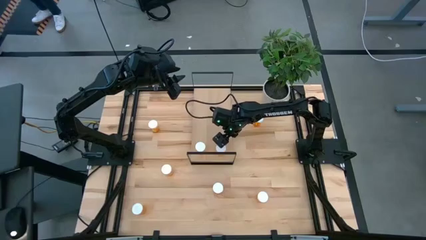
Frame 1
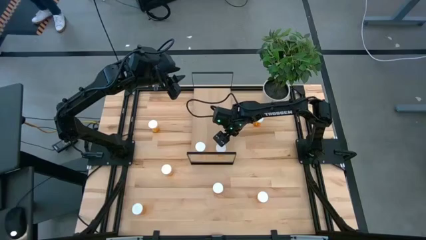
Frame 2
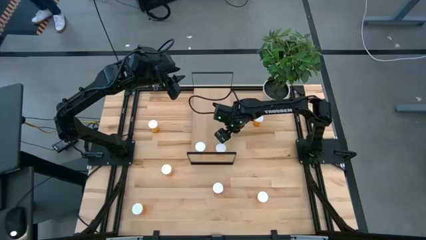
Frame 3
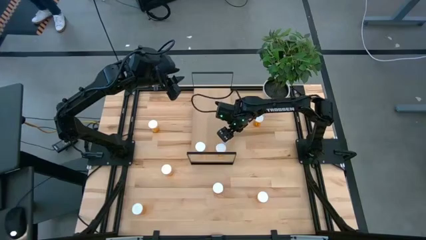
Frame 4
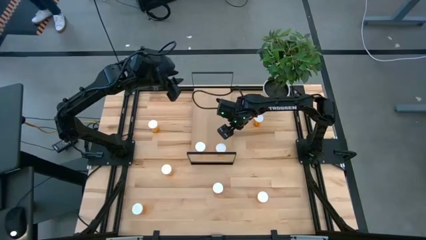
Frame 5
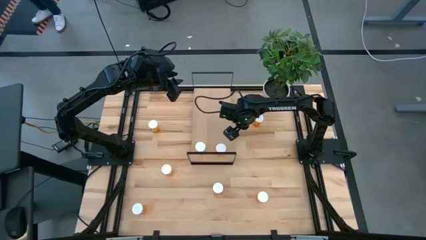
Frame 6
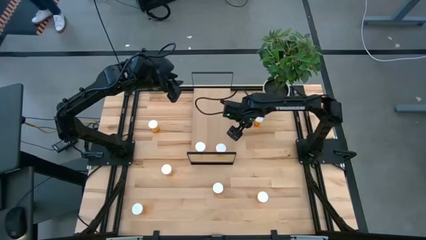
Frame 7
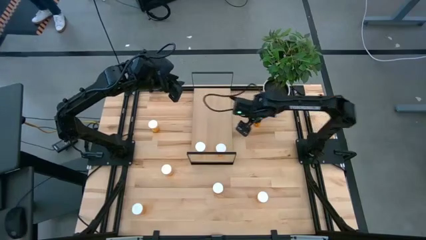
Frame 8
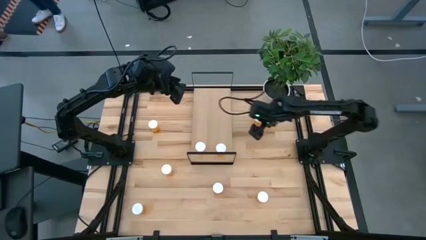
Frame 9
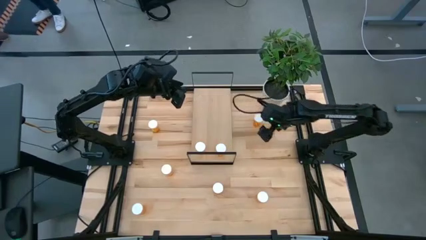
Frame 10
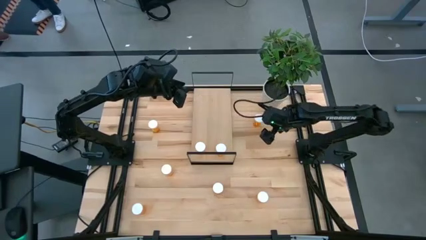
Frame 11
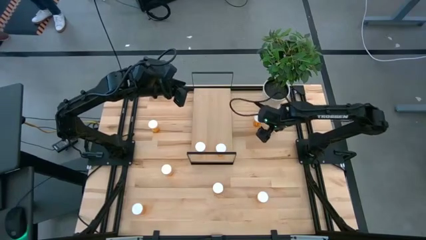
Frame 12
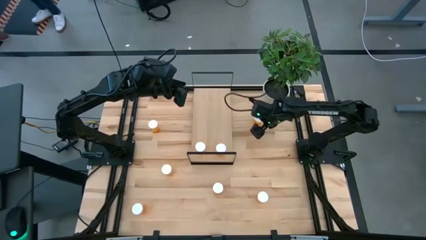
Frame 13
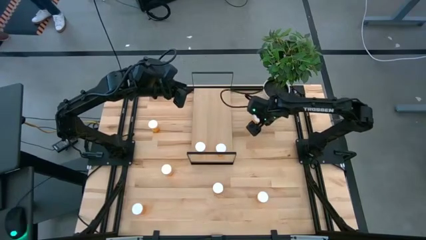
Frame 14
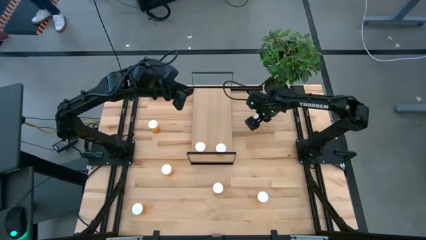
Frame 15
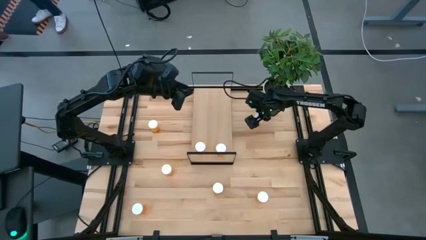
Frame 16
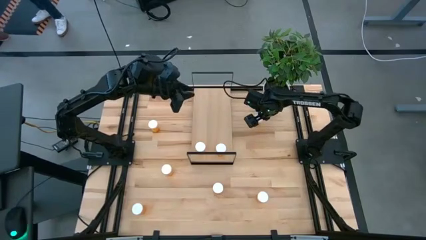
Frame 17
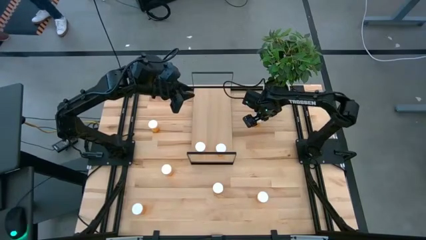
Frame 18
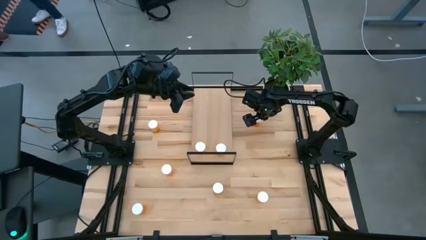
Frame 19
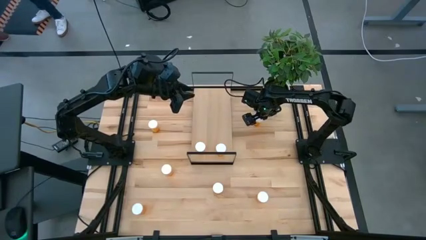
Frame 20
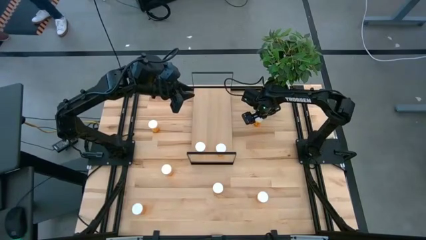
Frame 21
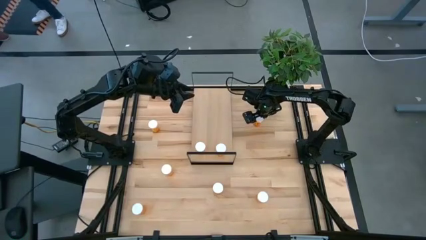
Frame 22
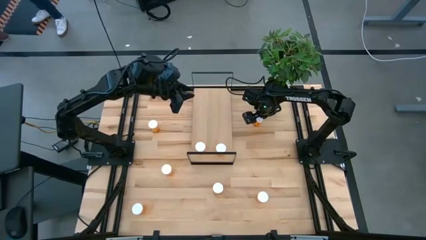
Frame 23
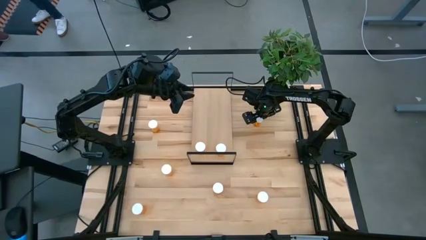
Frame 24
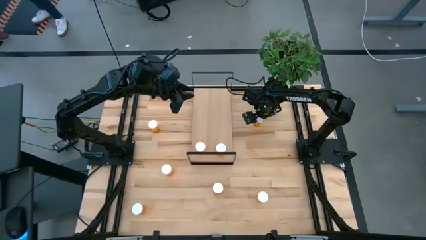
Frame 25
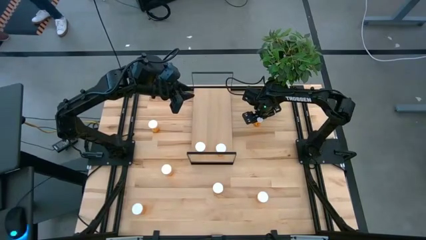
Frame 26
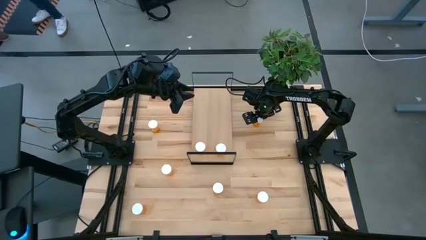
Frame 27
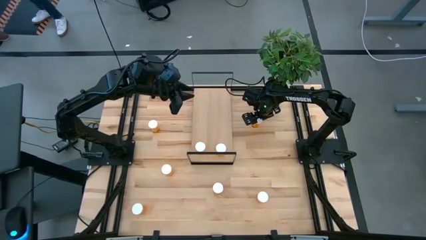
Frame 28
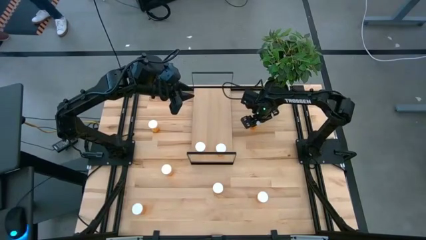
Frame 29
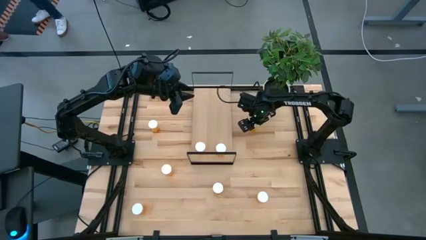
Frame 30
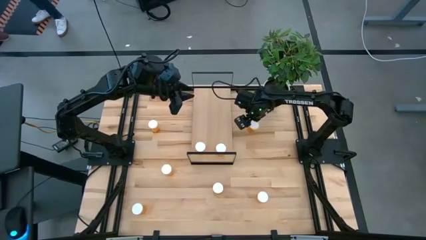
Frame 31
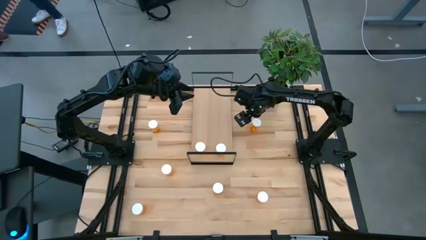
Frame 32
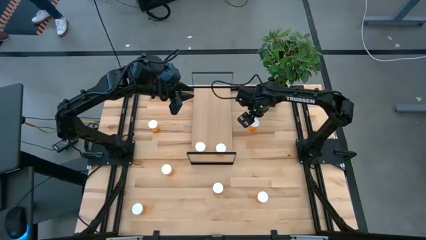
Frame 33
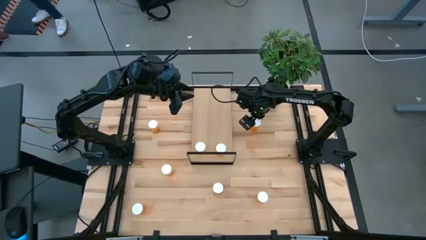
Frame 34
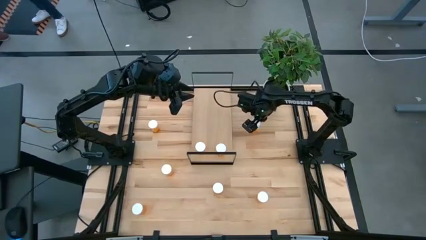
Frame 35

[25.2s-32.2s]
Task: Pick and place medicine bottles onto shelf by color
Put the orange pill bottle on the shelf aligned with the other orange pill bottles

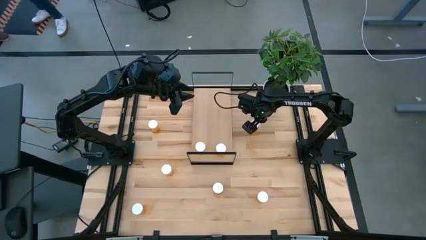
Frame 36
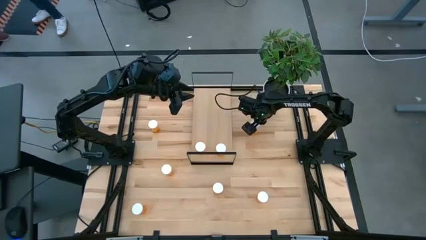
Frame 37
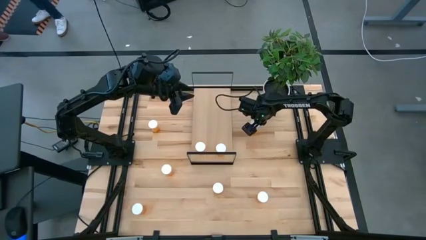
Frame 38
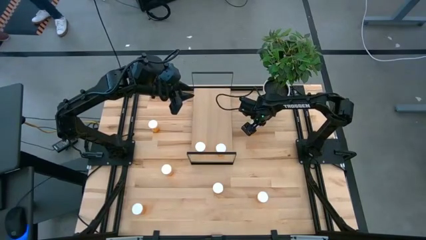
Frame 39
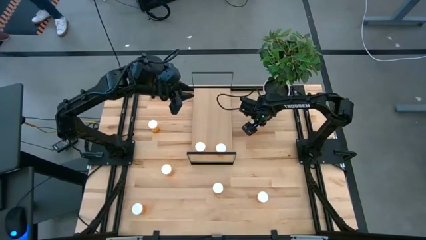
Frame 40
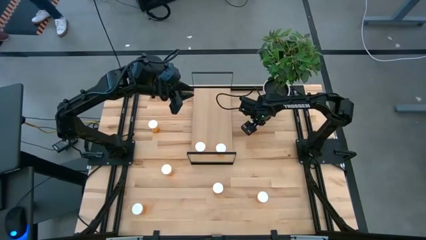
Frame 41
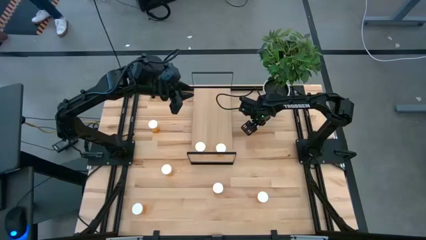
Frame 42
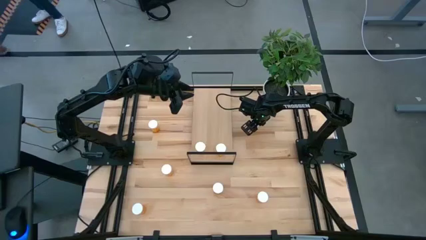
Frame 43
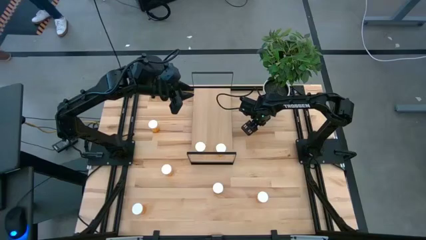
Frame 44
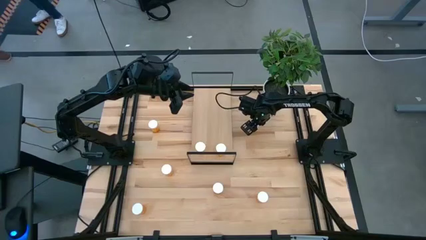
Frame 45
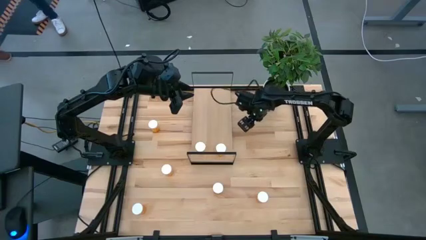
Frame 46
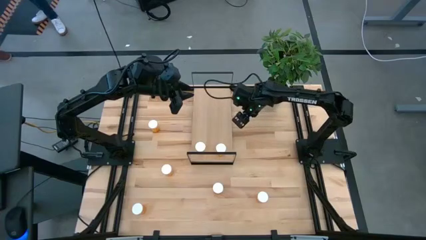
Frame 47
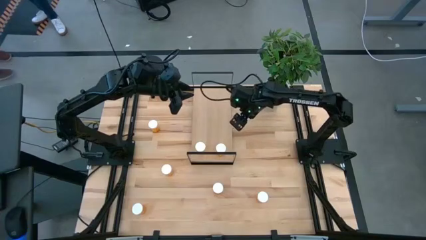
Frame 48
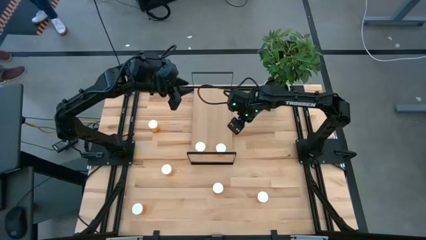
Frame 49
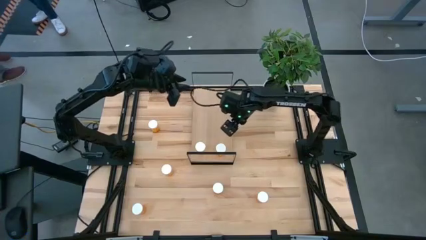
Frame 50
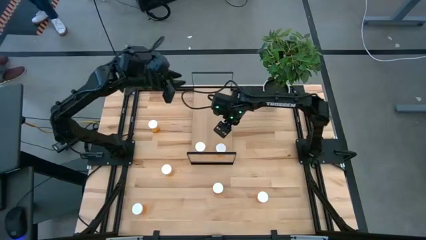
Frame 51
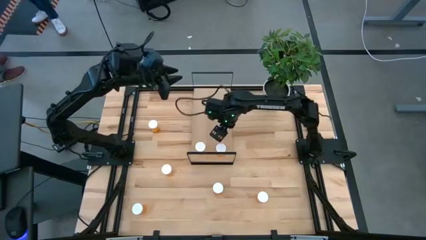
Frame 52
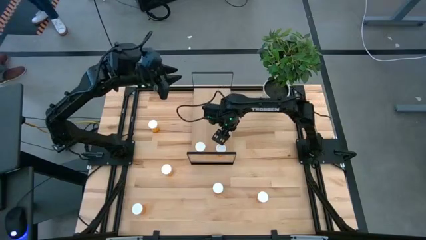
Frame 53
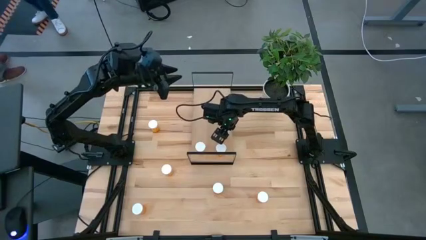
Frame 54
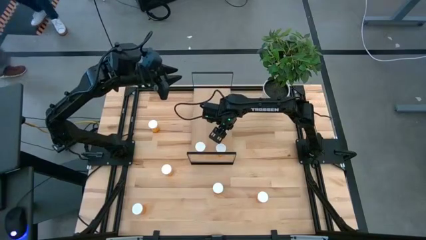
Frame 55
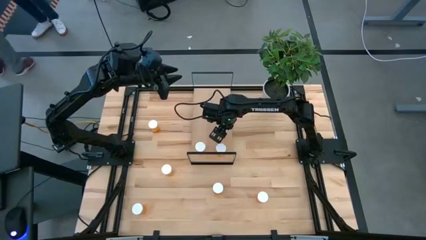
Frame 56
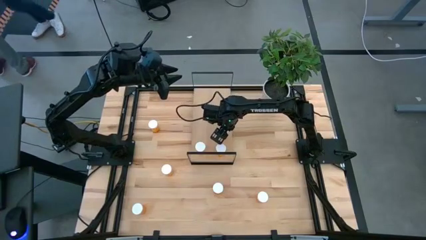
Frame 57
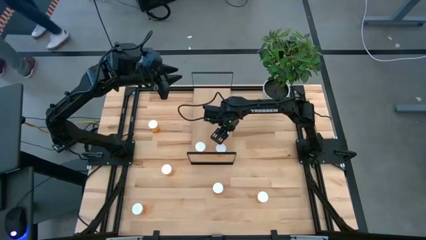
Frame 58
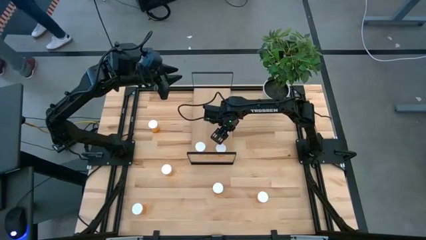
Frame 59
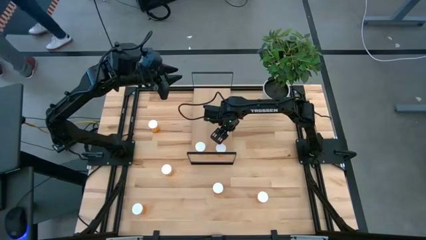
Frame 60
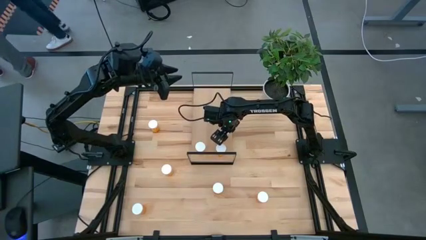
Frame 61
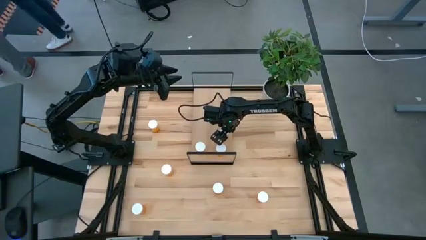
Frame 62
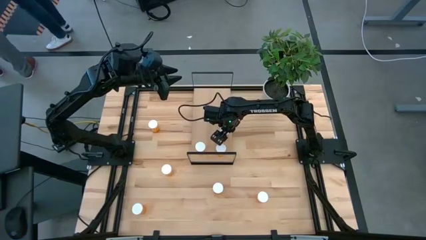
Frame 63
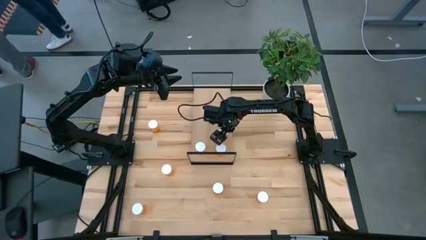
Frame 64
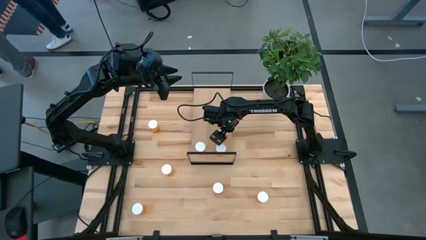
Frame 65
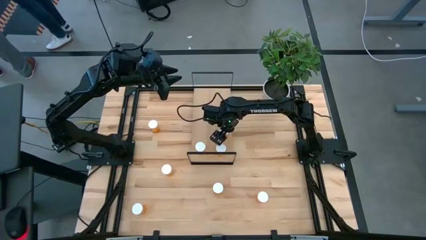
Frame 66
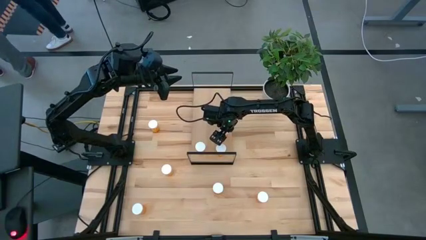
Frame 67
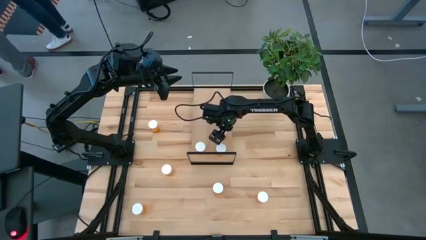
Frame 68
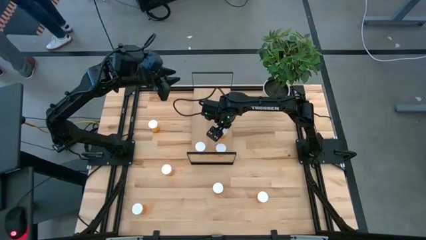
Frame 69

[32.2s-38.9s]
Put the orange pill bottle on the shelf aligned with the other orange pill bottles

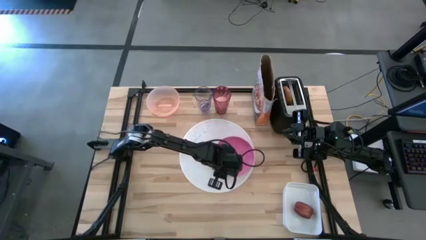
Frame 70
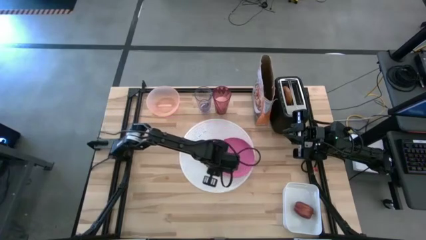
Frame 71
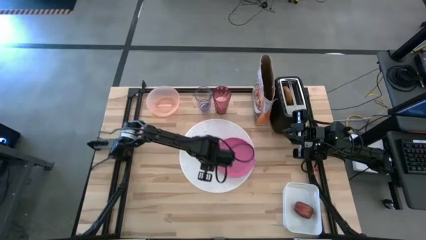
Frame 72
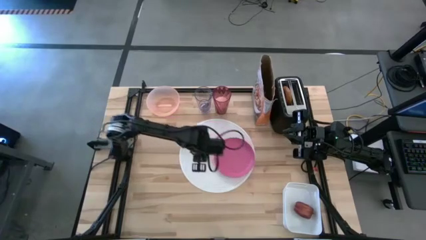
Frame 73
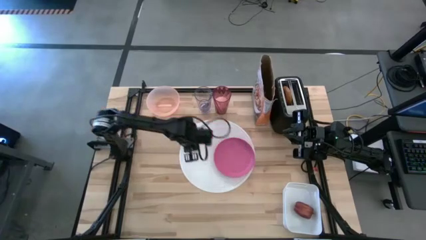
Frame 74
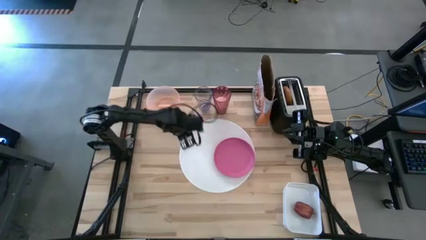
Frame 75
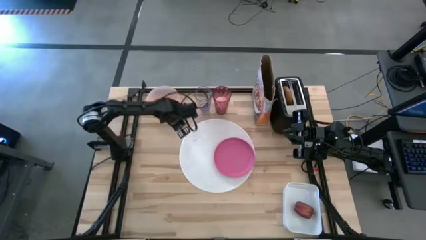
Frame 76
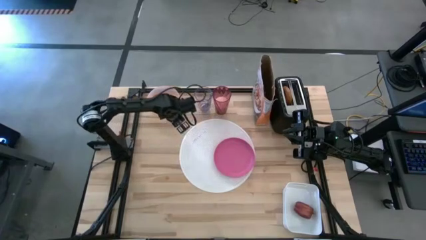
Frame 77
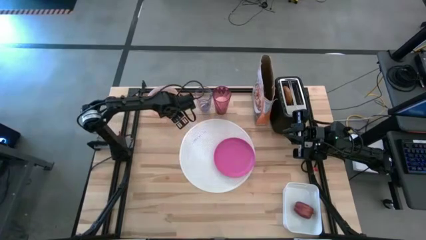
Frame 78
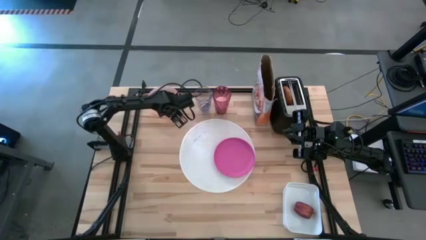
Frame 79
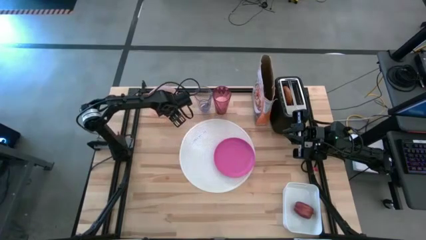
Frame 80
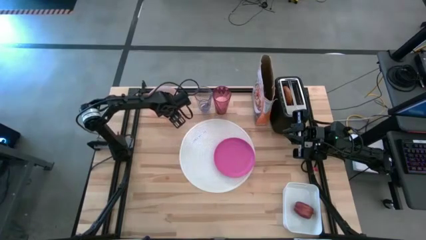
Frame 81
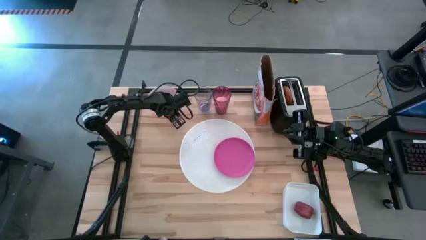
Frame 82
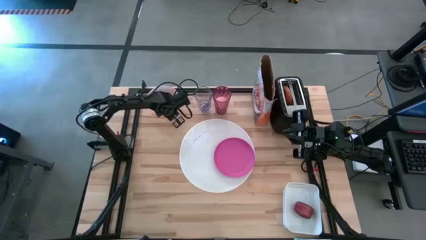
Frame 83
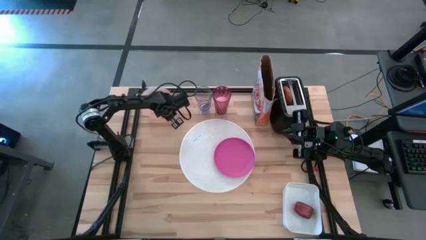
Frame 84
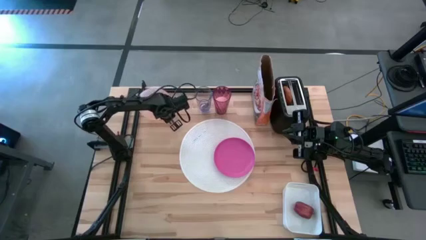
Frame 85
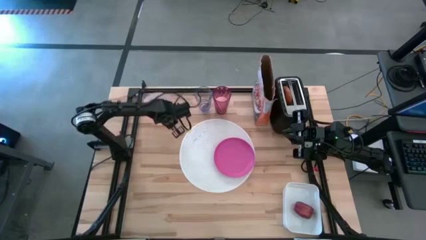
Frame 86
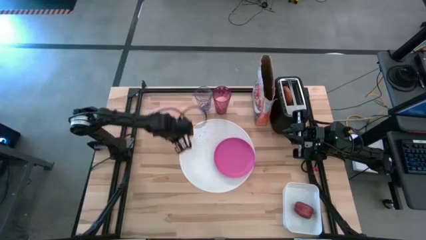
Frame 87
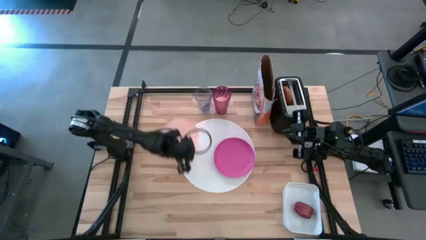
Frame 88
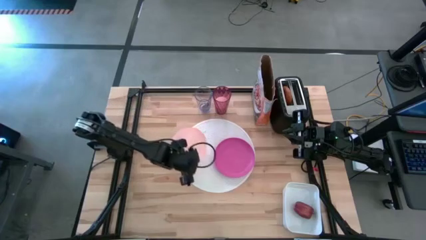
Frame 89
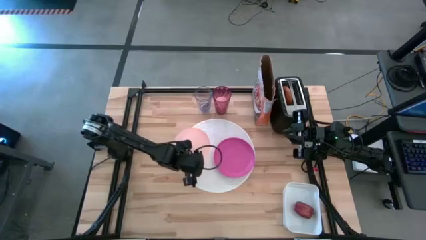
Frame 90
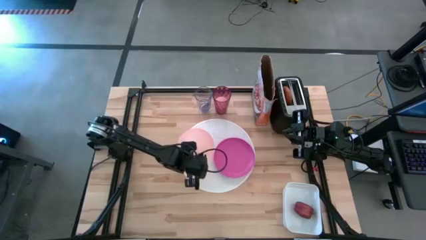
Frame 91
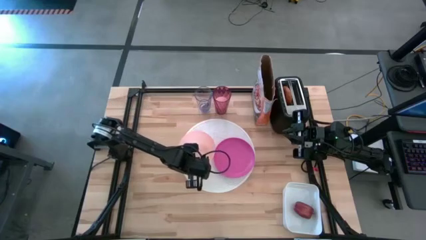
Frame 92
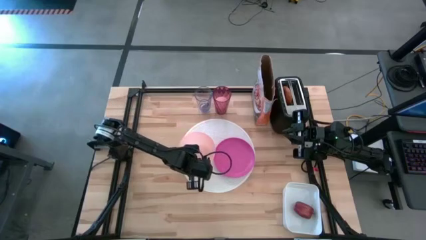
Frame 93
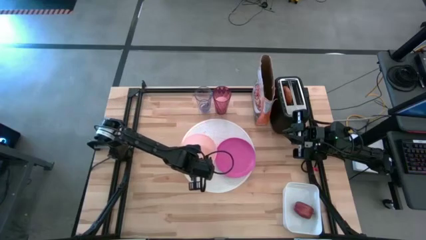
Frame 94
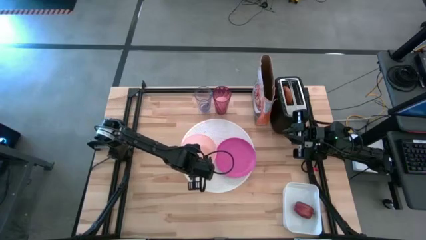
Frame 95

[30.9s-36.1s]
Task: Arrange a breakfast setting
Put the orange bowl on the white table mat to the top left of the pink plate
